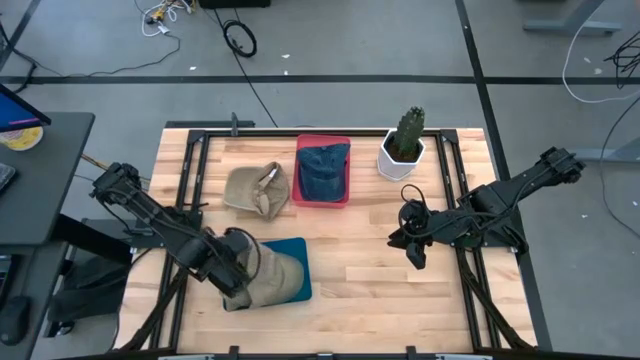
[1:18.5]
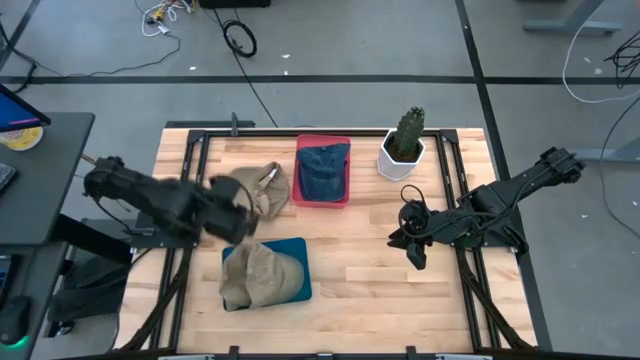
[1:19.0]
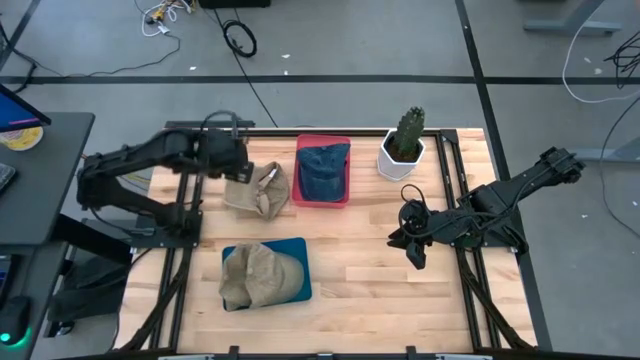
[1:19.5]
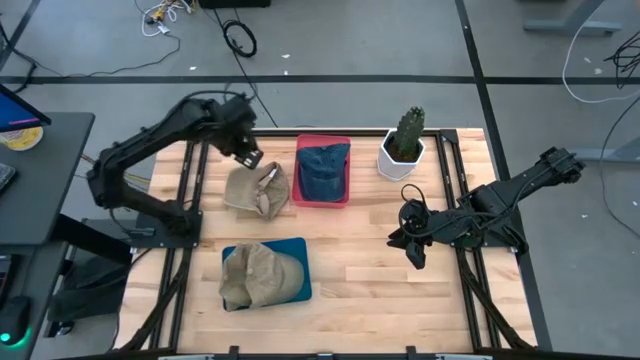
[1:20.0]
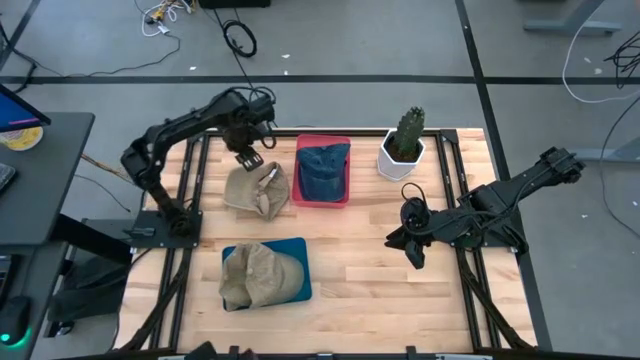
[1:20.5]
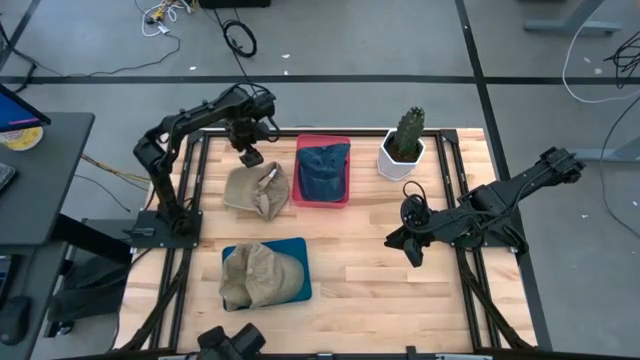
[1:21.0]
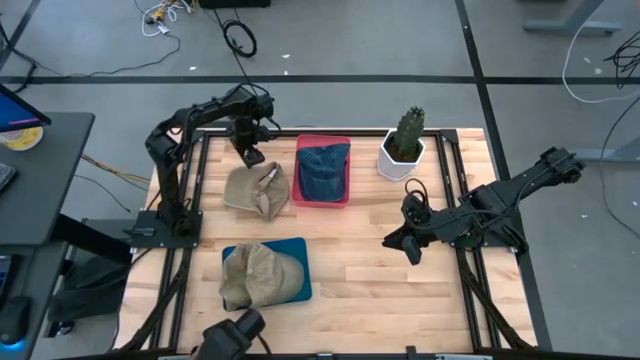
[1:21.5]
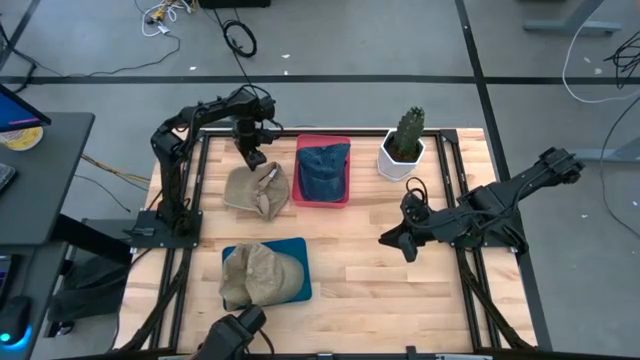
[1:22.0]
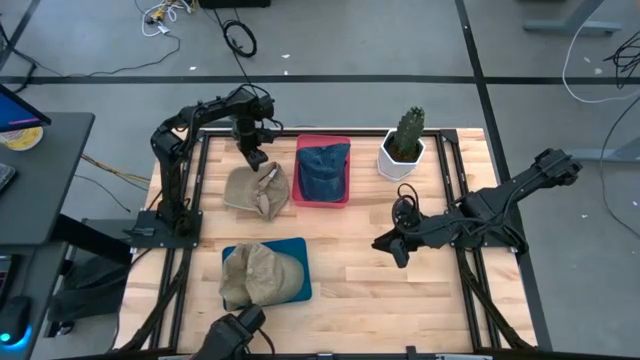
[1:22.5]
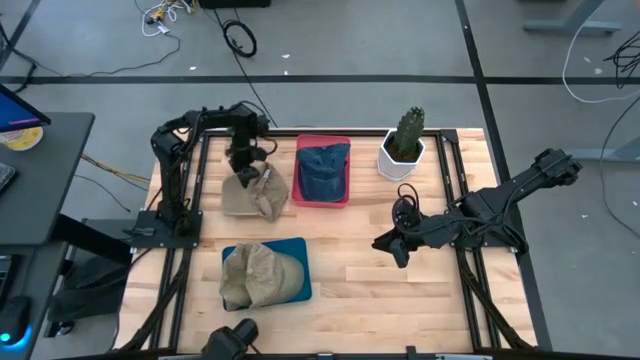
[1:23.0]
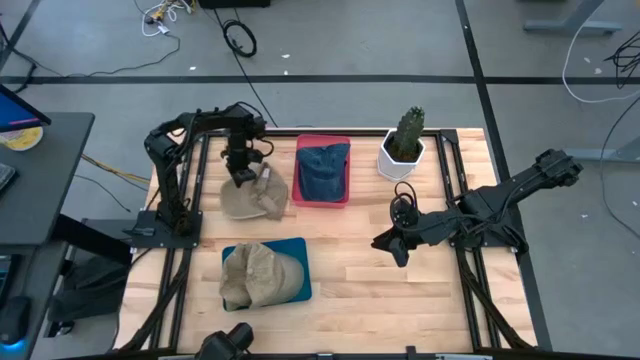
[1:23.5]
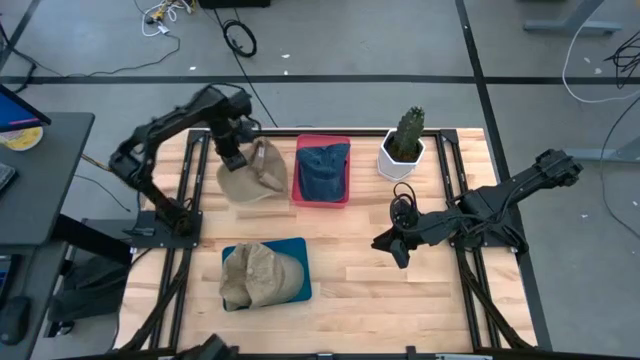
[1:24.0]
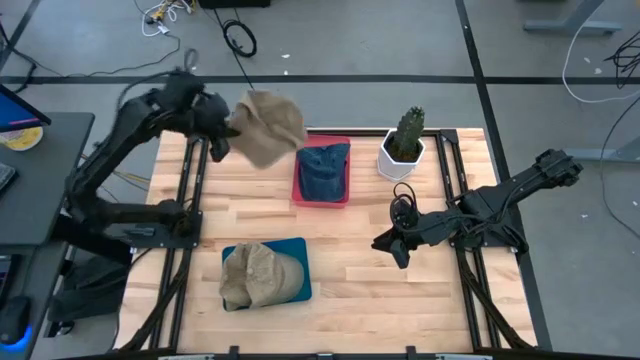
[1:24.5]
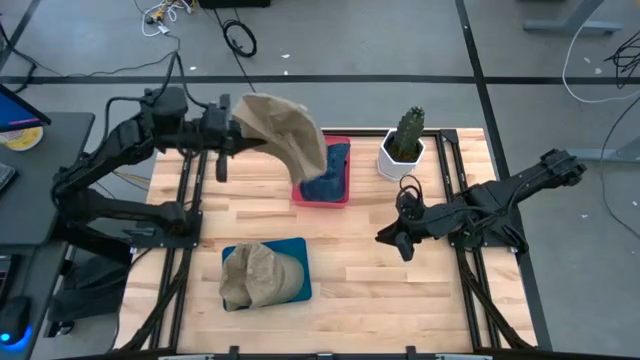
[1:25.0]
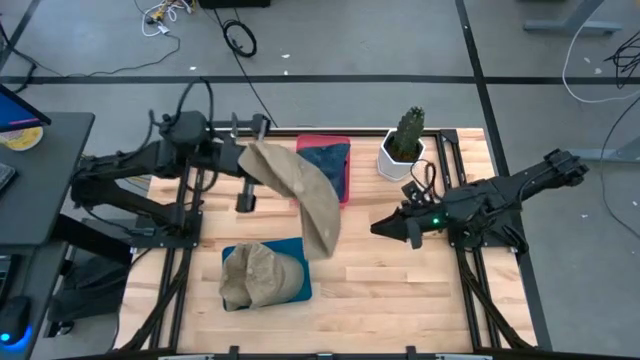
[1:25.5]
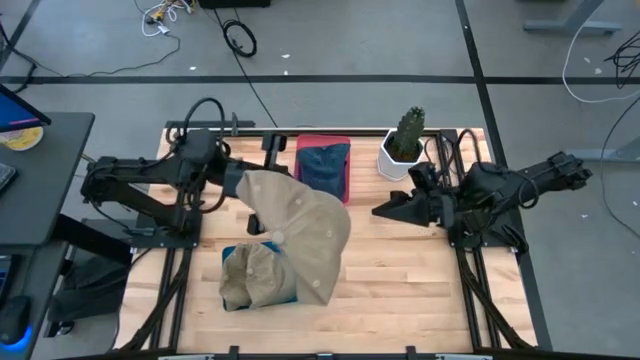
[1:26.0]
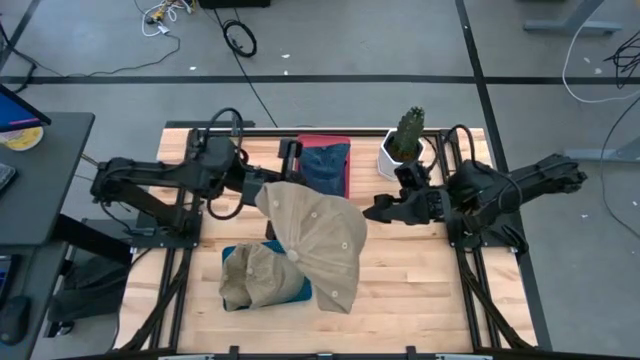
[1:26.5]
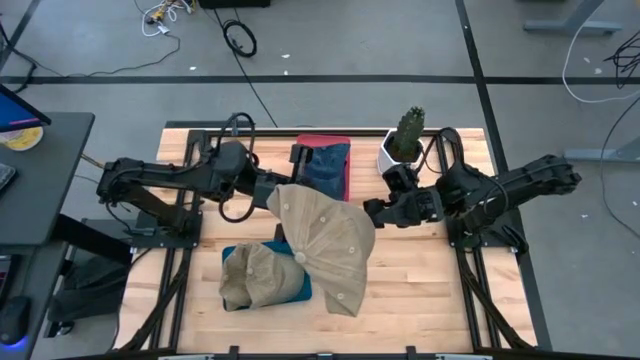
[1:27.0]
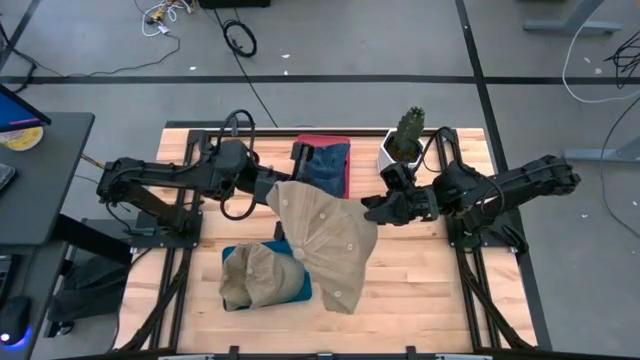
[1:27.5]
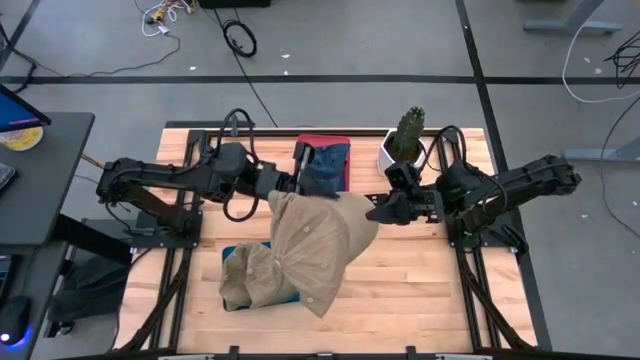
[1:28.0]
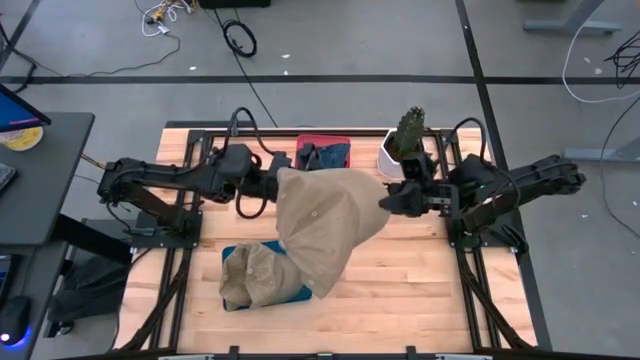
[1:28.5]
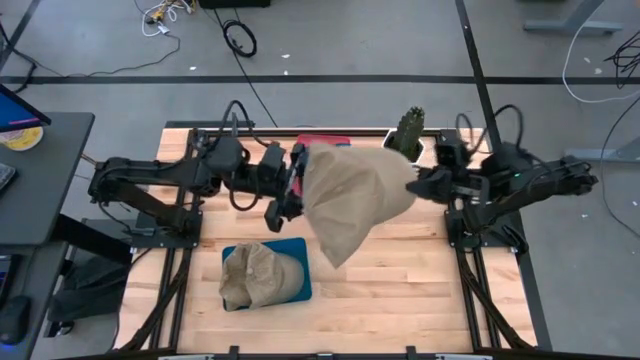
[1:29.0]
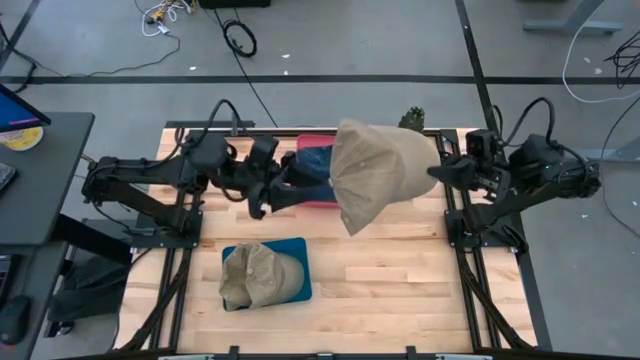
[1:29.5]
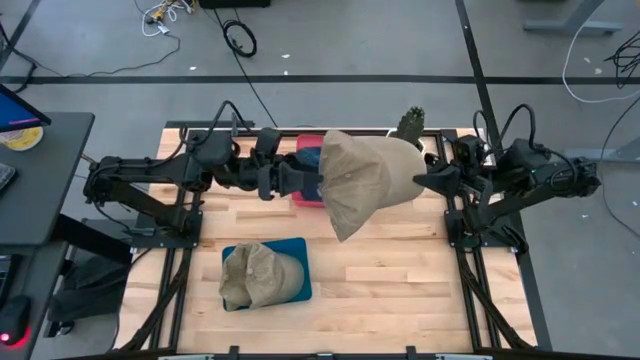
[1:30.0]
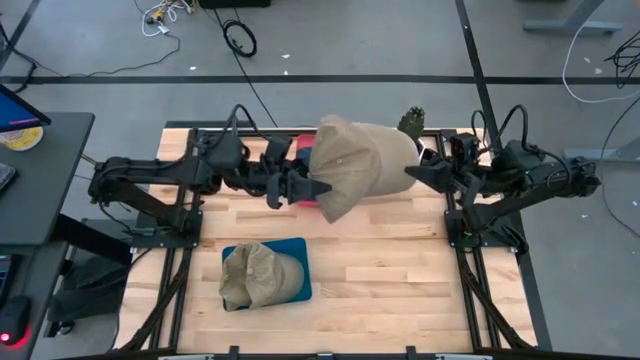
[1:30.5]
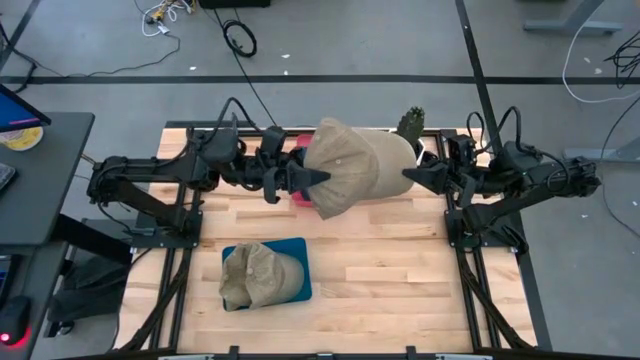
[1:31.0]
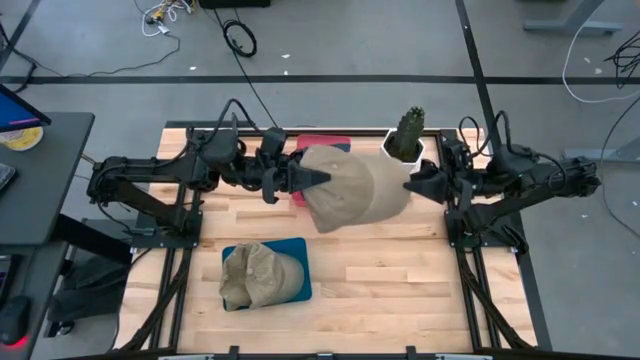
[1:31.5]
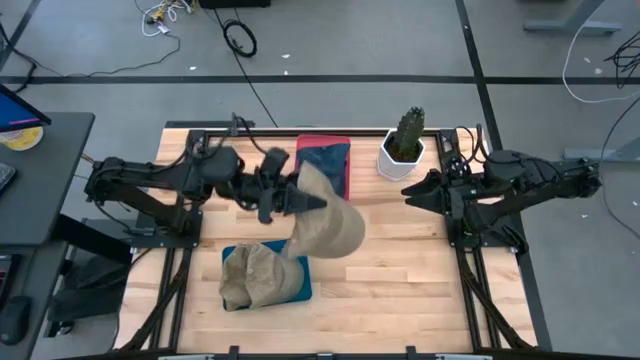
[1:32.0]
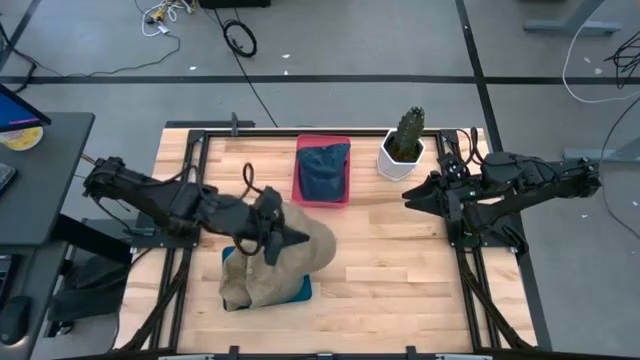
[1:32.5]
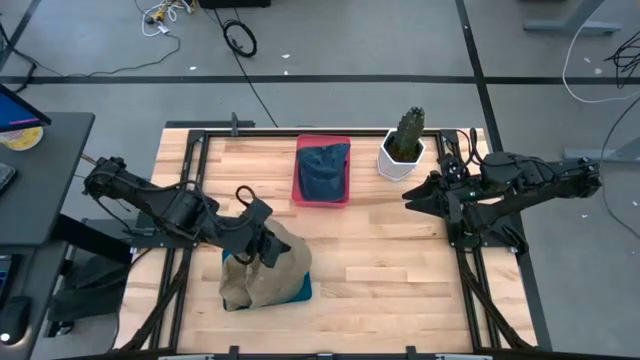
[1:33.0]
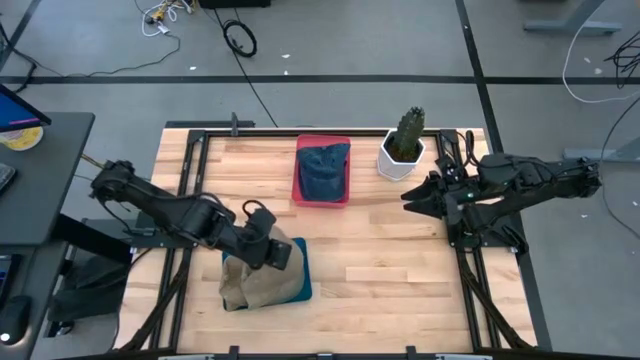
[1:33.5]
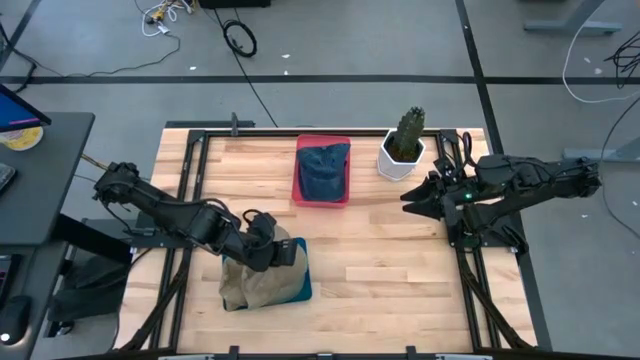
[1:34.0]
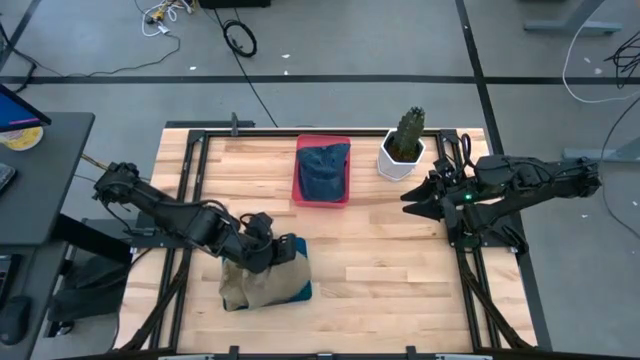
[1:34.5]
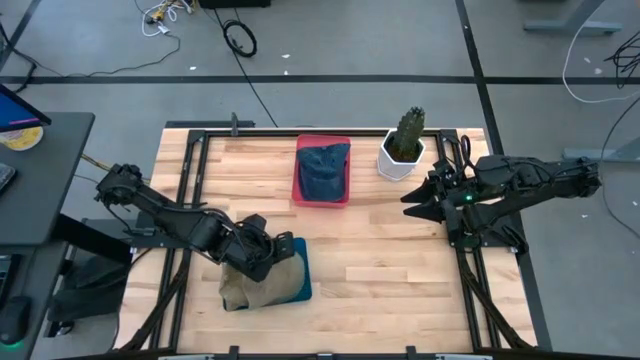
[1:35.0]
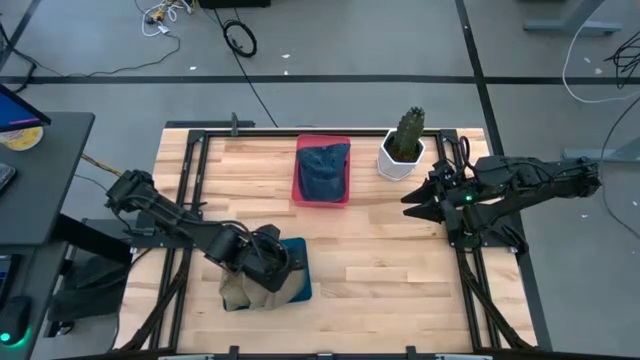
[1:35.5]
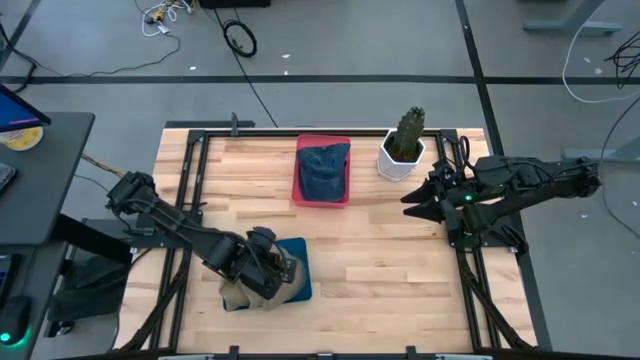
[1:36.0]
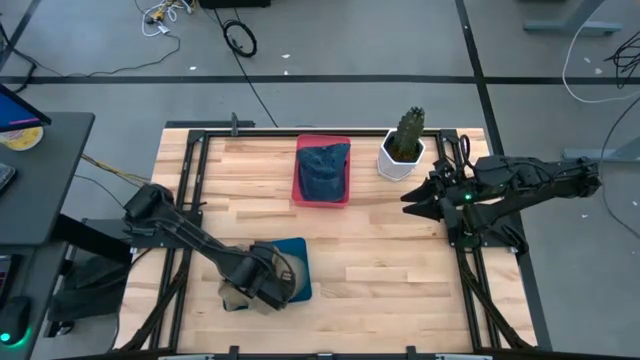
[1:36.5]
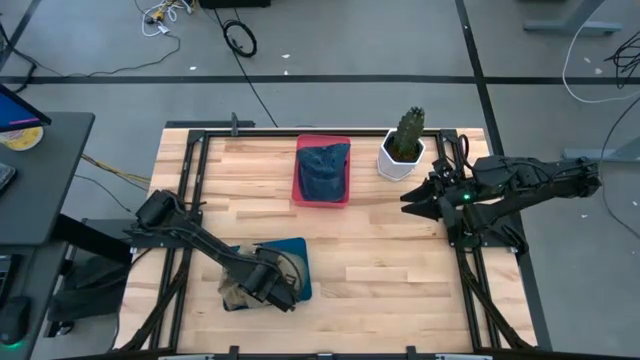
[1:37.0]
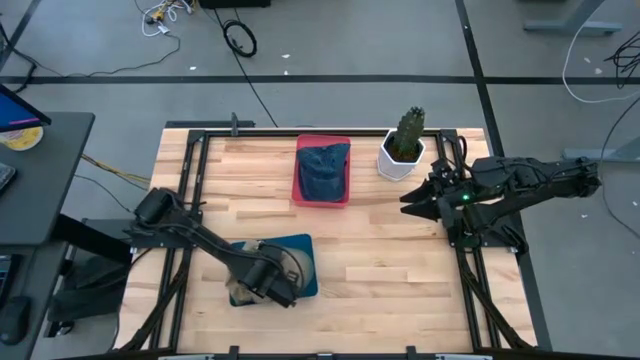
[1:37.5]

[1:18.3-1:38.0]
Task: Pick & Place hat
Put the brown cap into the blue bin
